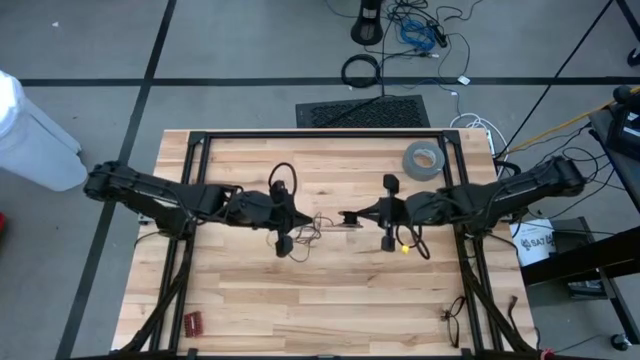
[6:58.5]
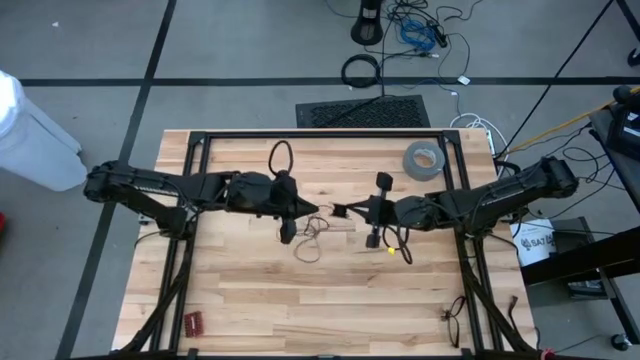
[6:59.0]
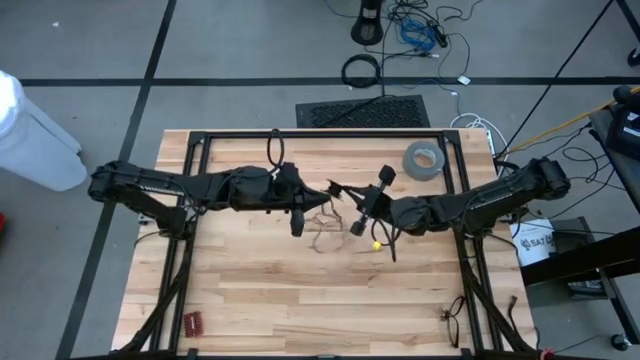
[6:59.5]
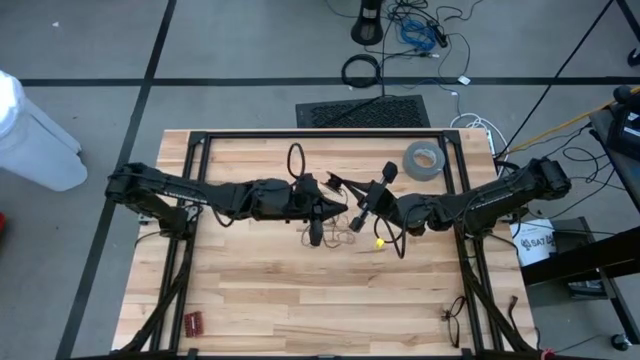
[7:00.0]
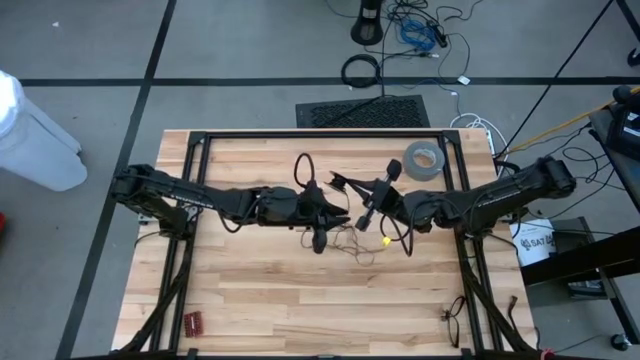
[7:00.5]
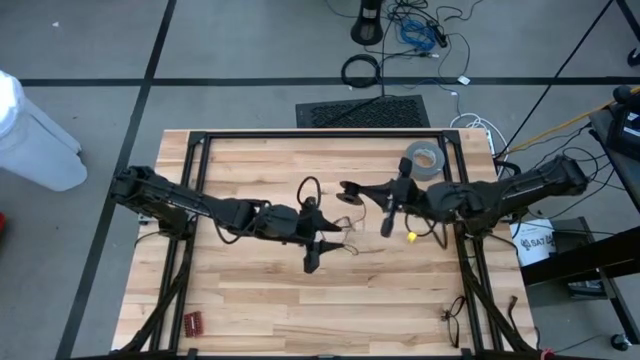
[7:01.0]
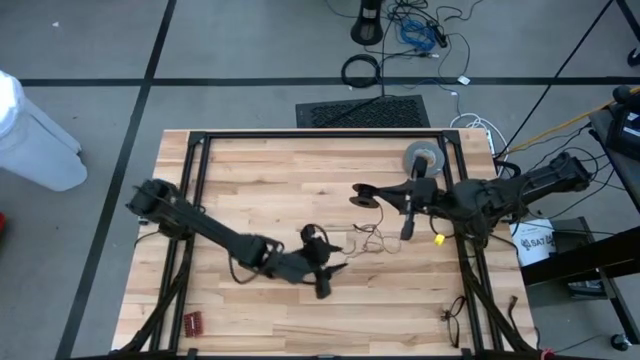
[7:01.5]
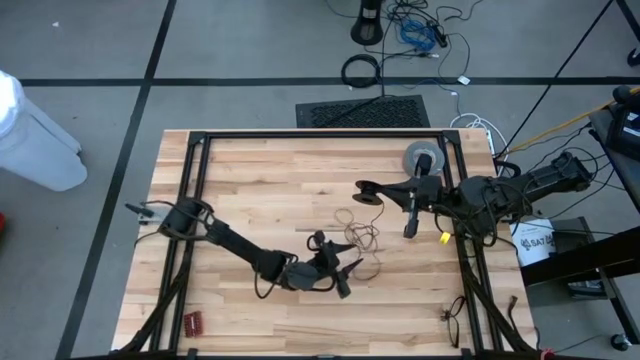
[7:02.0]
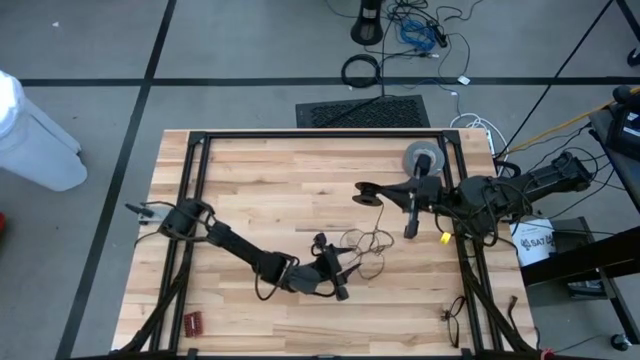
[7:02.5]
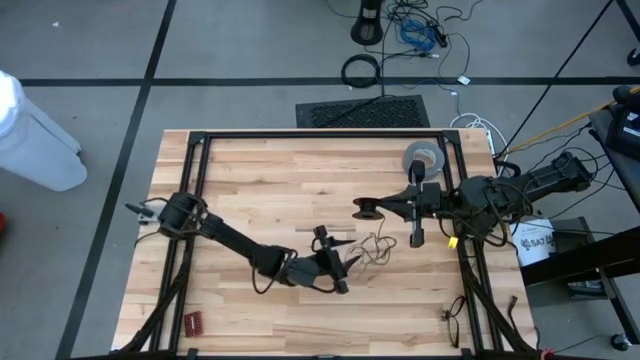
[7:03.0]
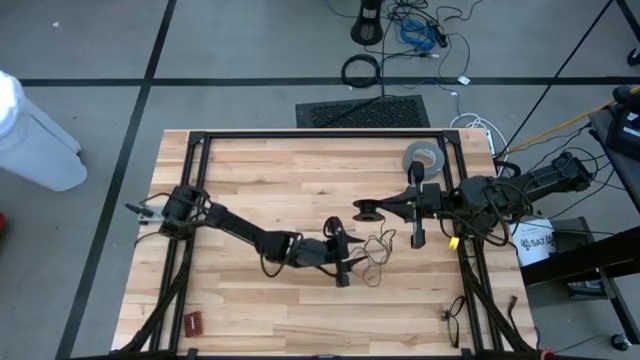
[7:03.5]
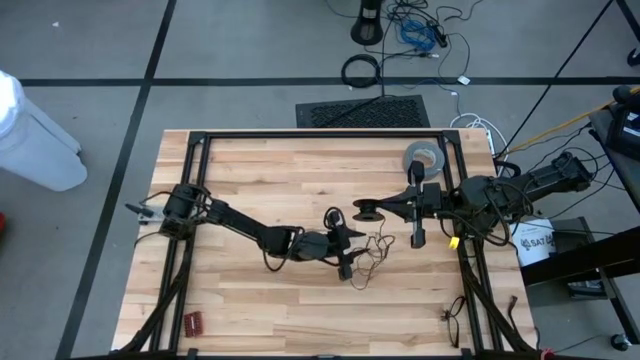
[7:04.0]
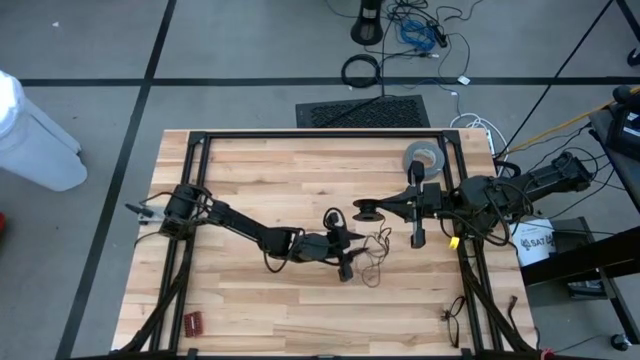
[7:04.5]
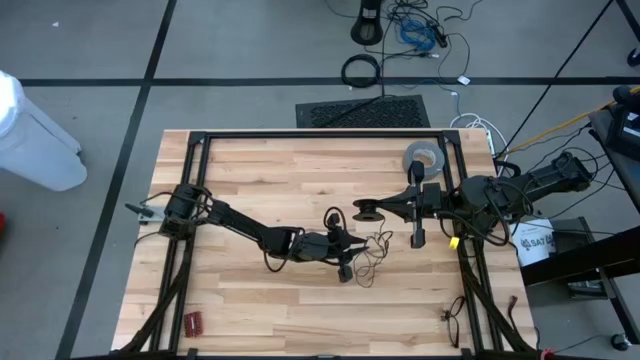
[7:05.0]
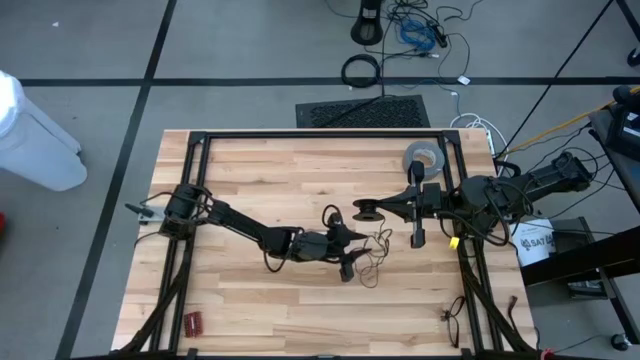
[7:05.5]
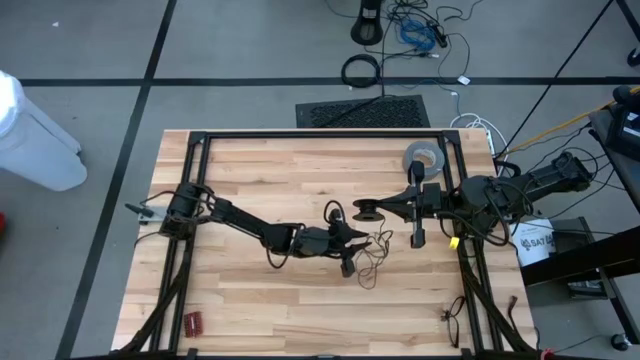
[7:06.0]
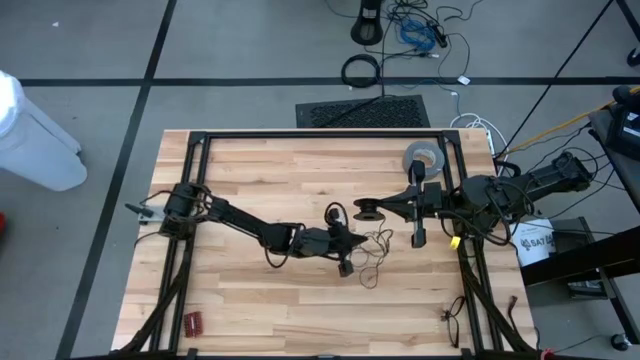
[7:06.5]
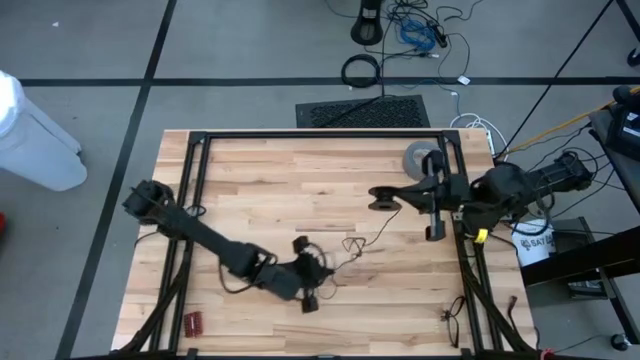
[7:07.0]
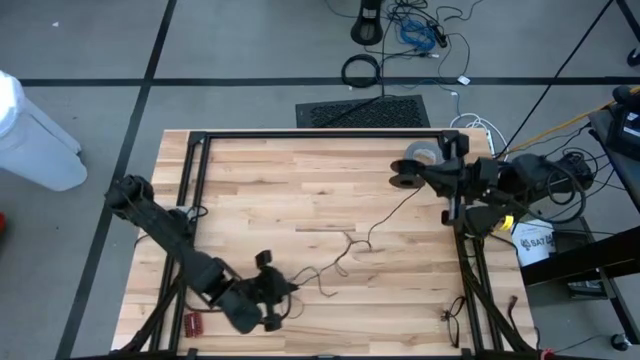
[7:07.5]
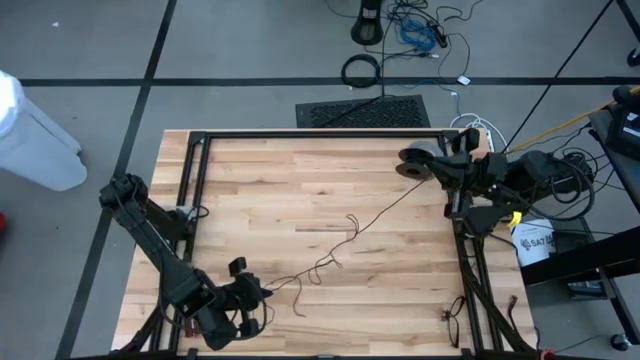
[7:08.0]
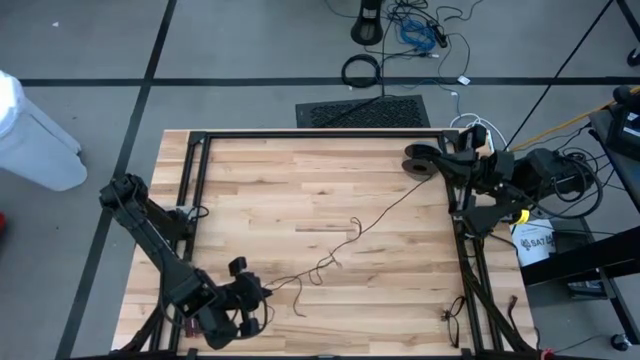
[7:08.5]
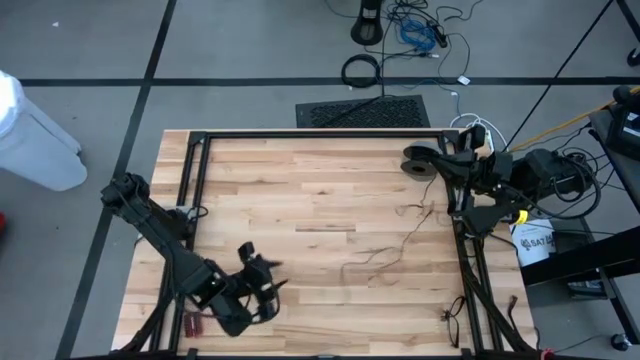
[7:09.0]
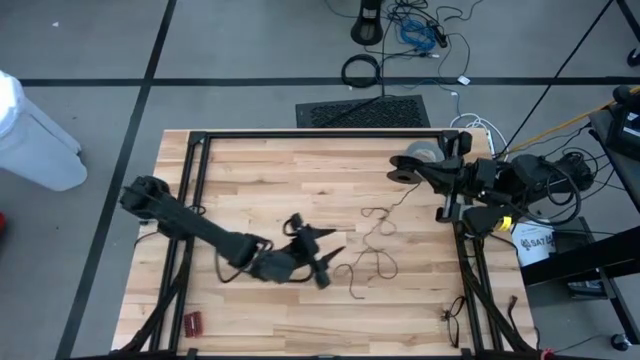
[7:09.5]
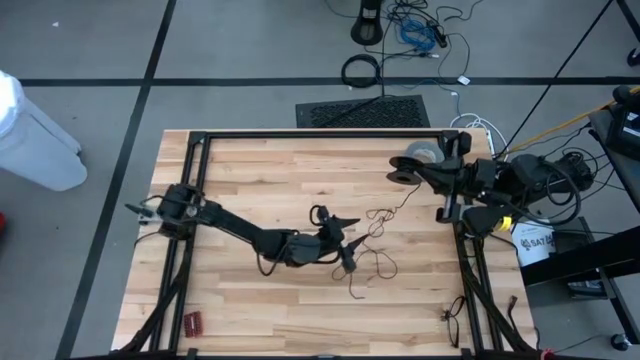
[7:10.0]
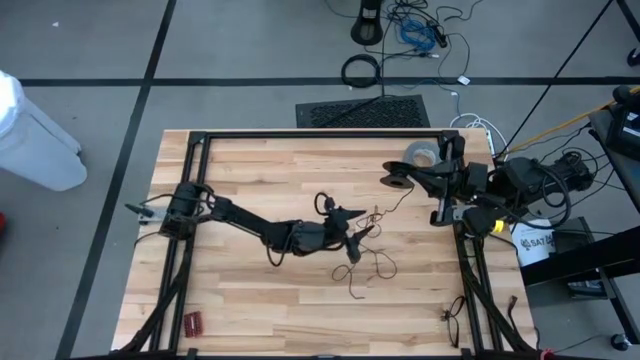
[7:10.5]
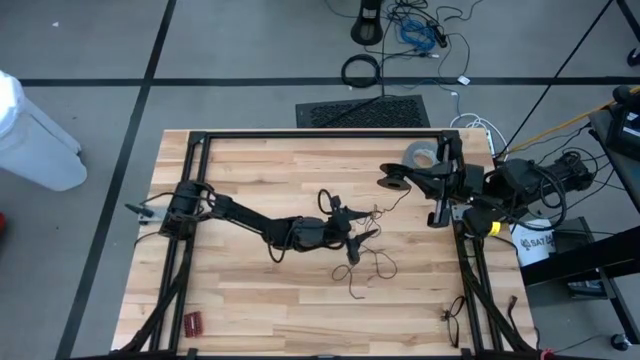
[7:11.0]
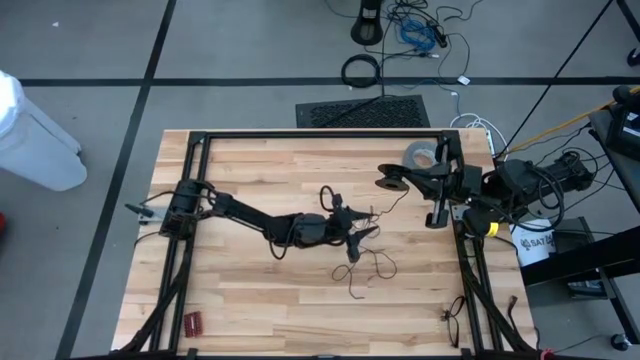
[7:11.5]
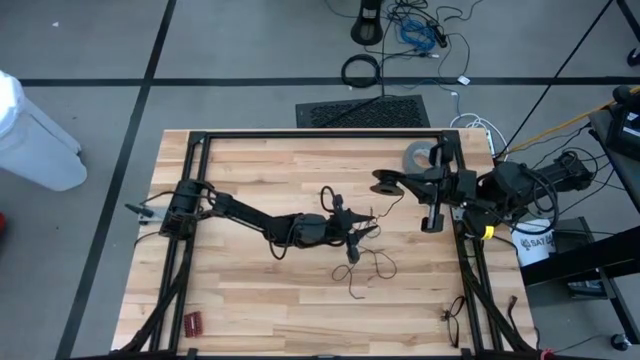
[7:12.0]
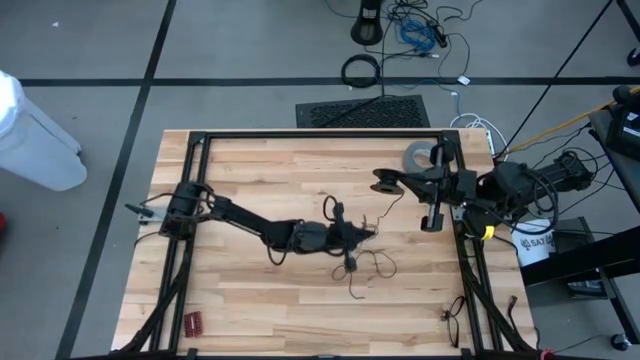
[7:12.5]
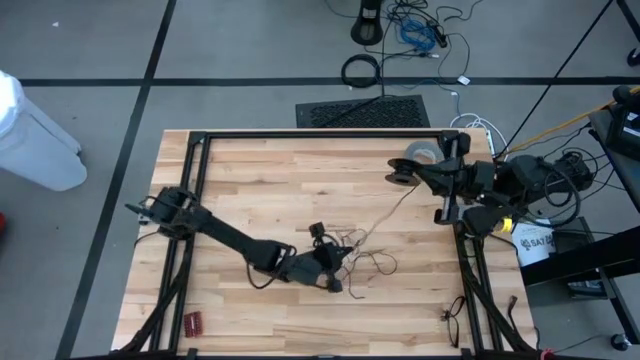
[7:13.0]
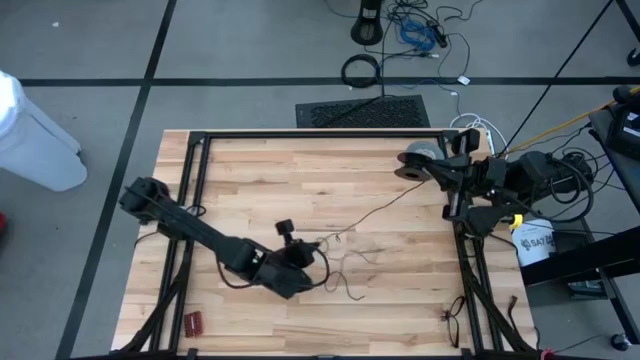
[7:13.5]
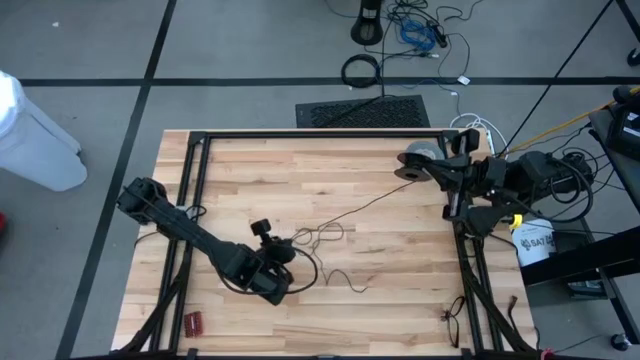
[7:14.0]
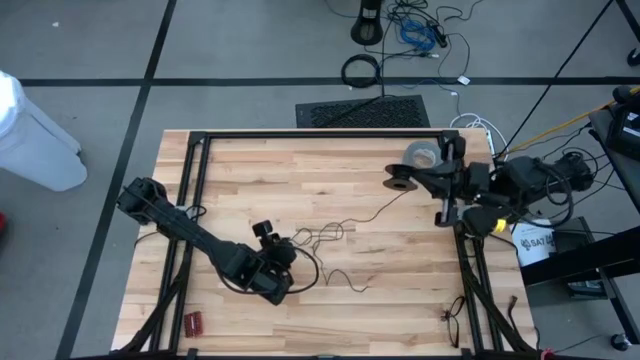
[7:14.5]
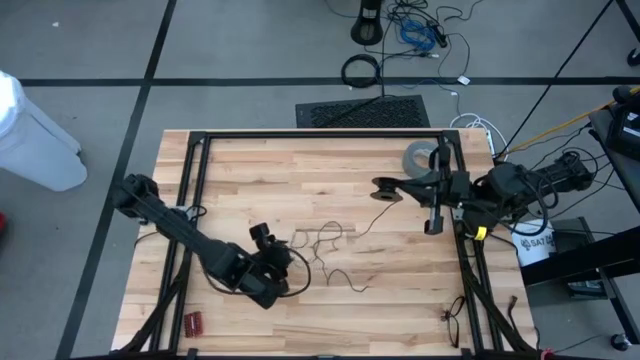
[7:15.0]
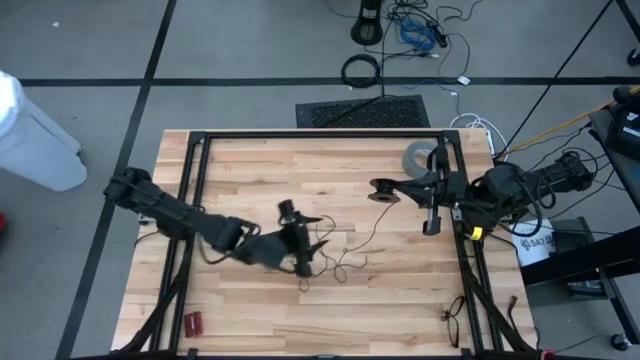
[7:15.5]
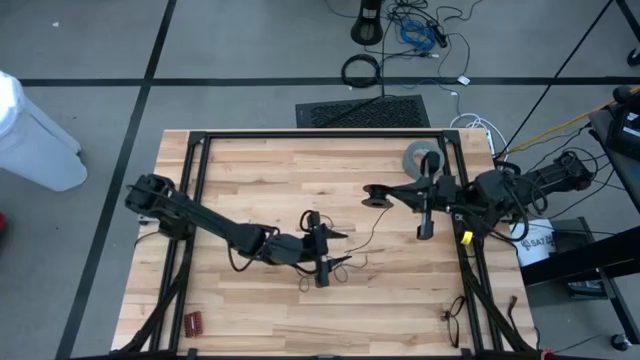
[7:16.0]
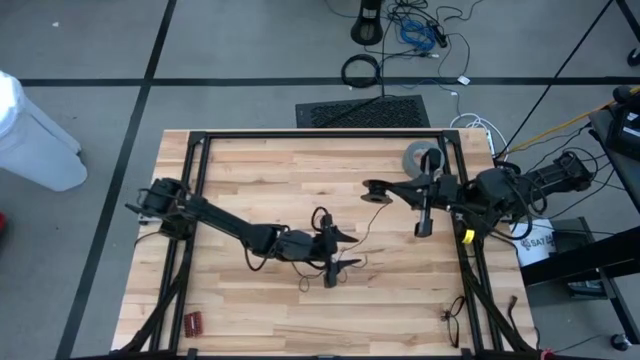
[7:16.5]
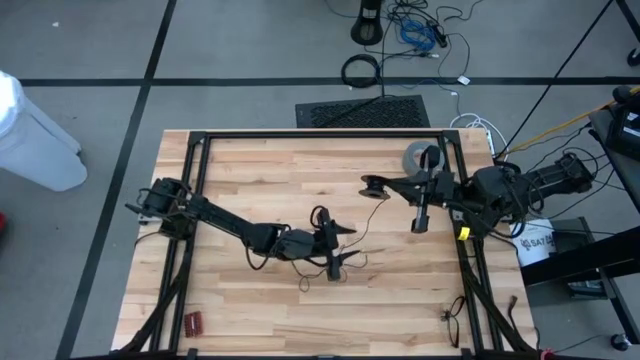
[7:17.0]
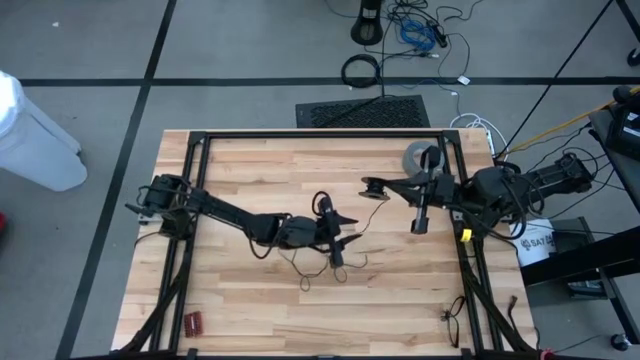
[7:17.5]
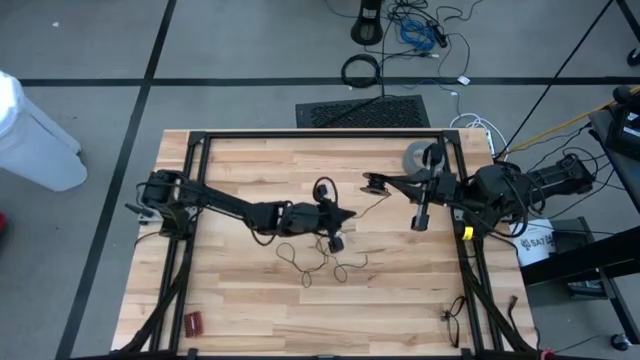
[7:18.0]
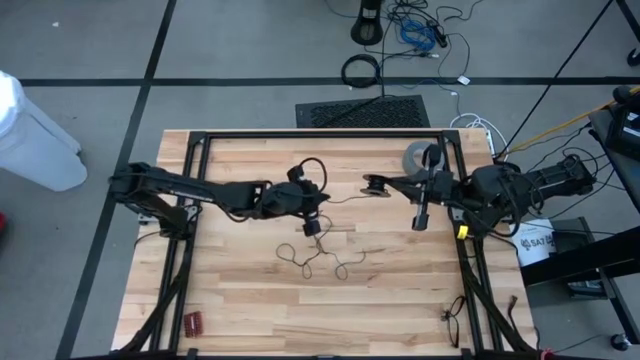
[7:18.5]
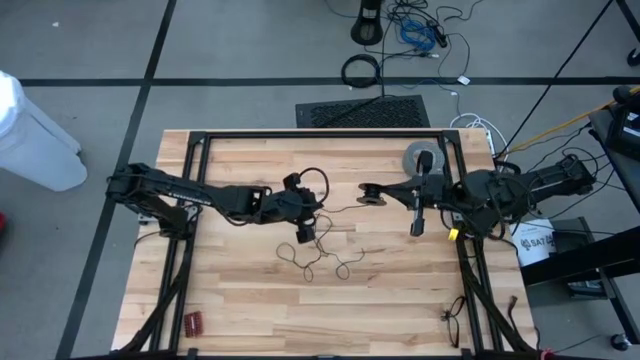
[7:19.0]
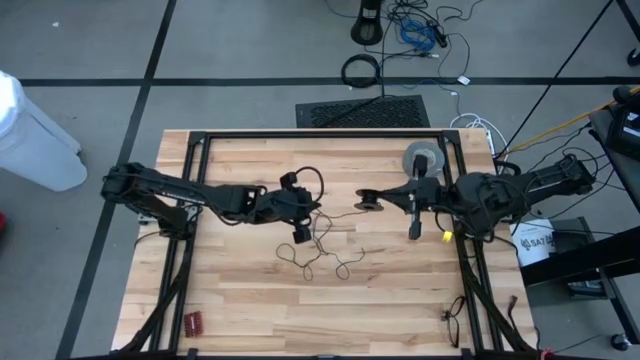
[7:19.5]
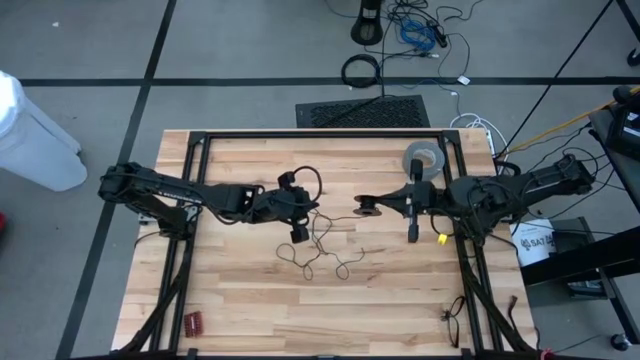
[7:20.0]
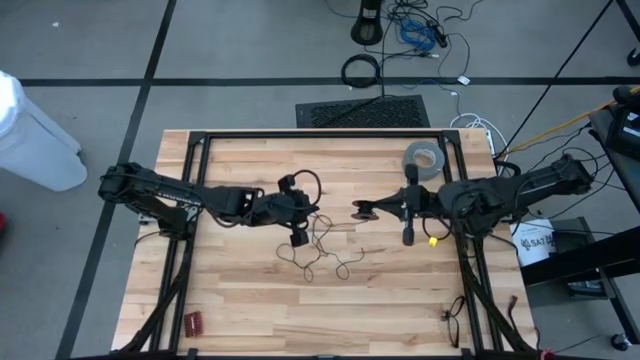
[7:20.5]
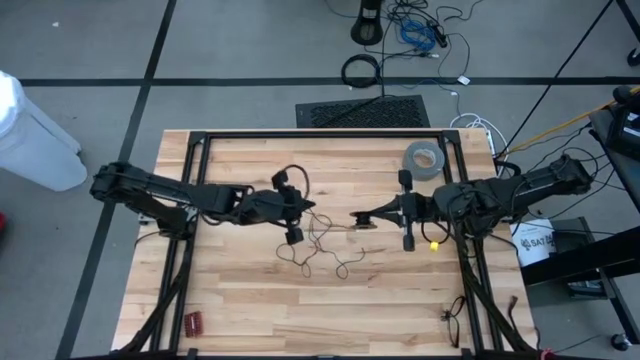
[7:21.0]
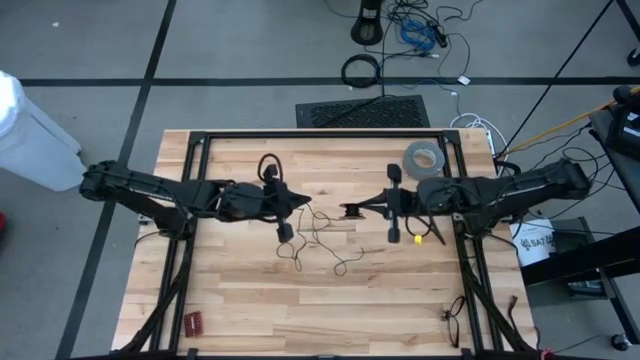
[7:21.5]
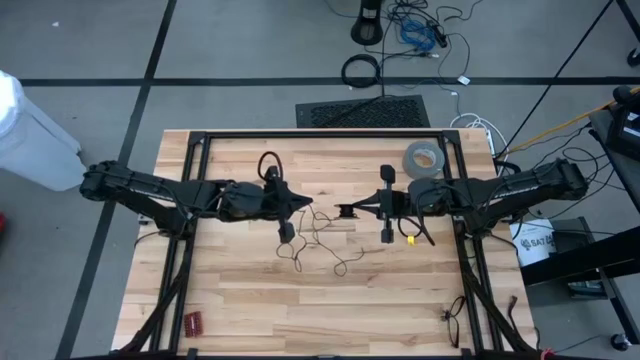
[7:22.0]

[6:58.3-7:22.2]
Task: Coil cords
Coil the black wire onto the spool
